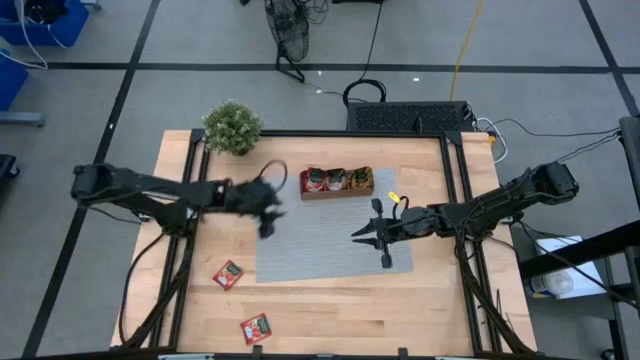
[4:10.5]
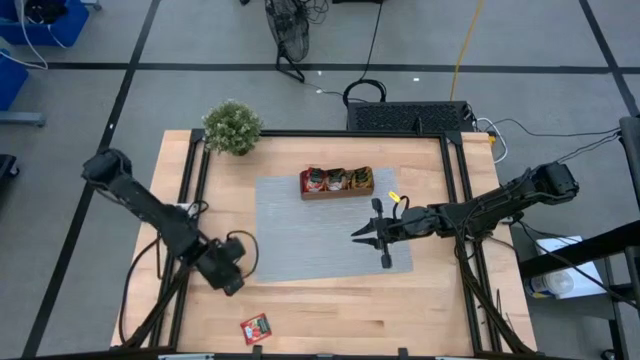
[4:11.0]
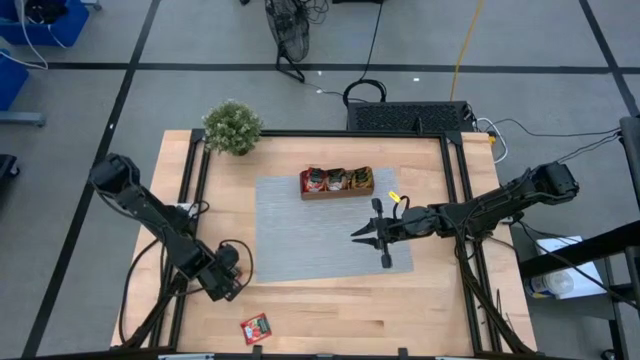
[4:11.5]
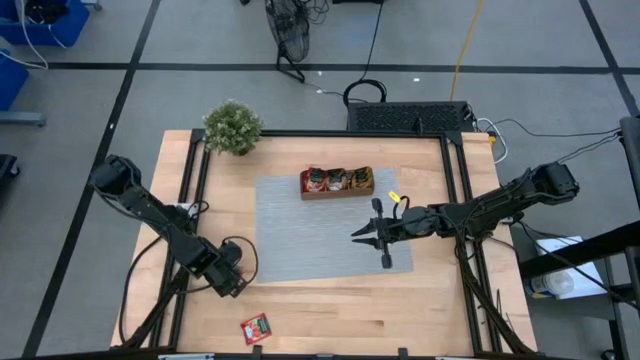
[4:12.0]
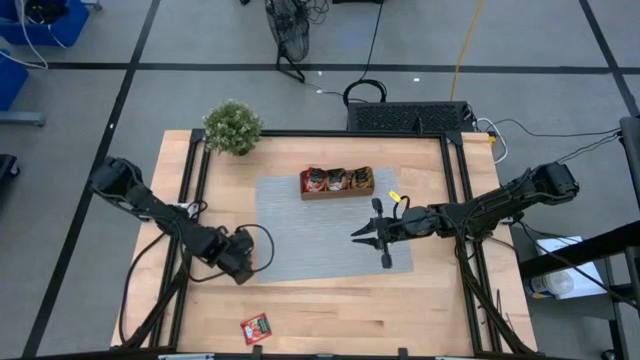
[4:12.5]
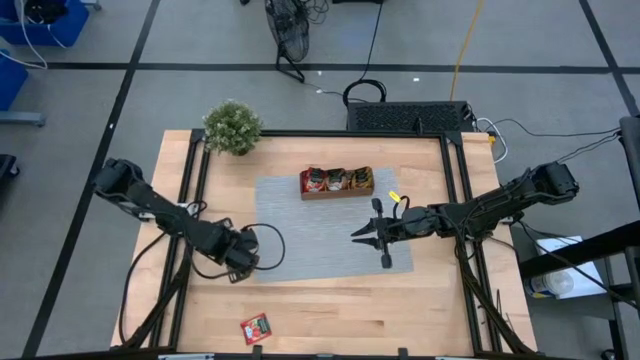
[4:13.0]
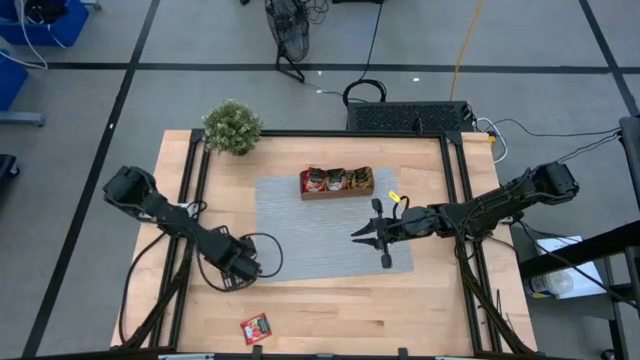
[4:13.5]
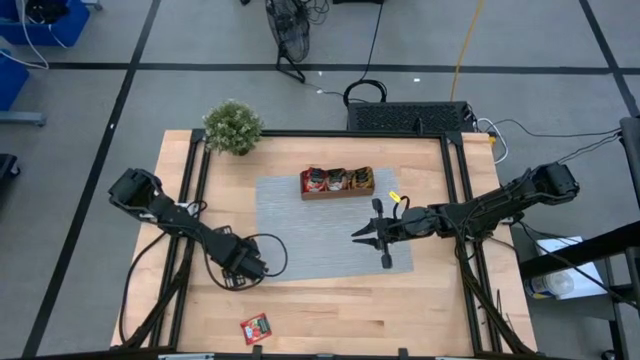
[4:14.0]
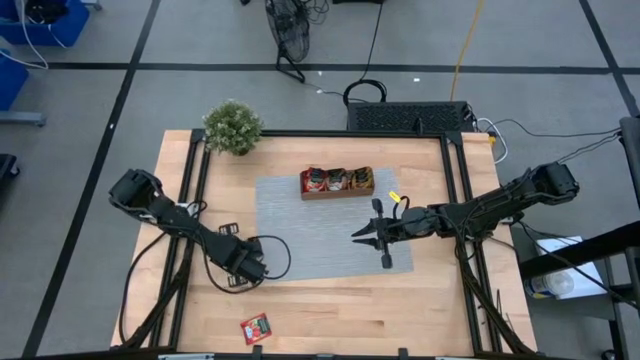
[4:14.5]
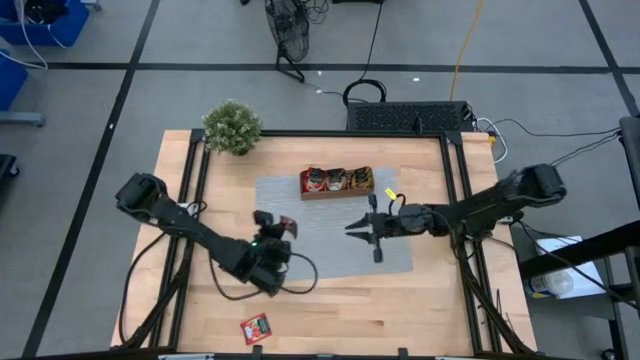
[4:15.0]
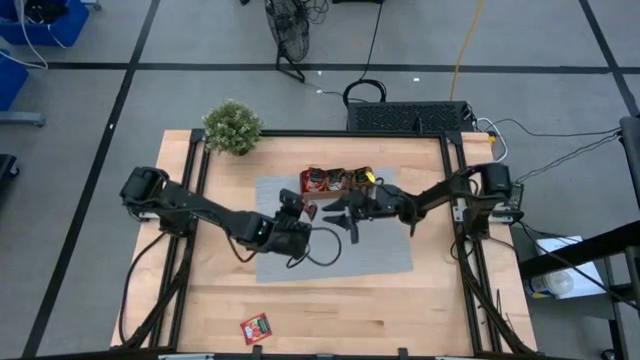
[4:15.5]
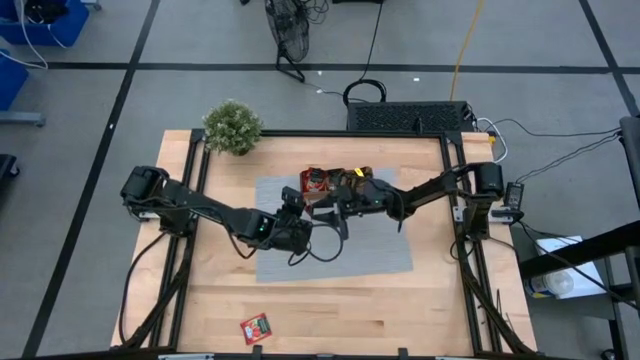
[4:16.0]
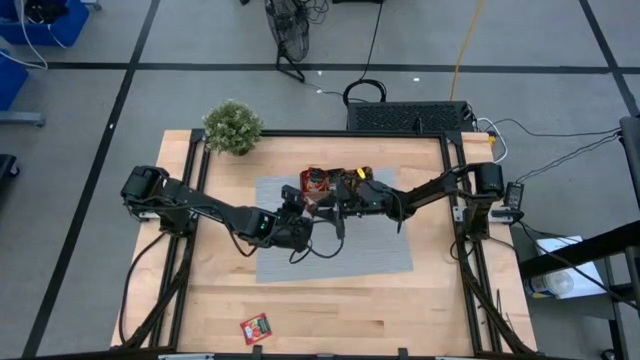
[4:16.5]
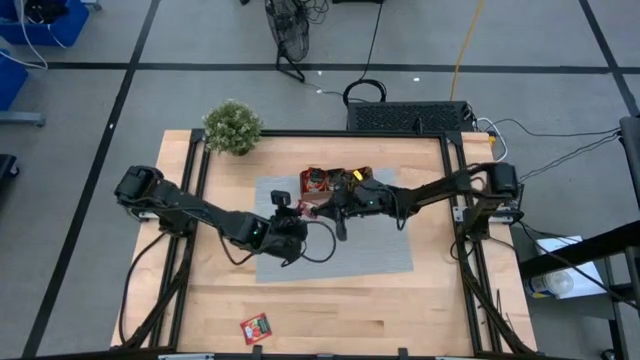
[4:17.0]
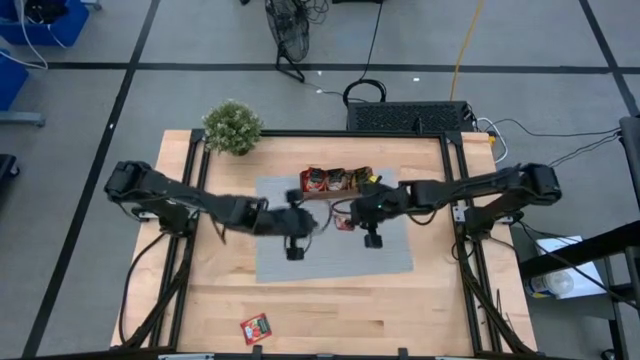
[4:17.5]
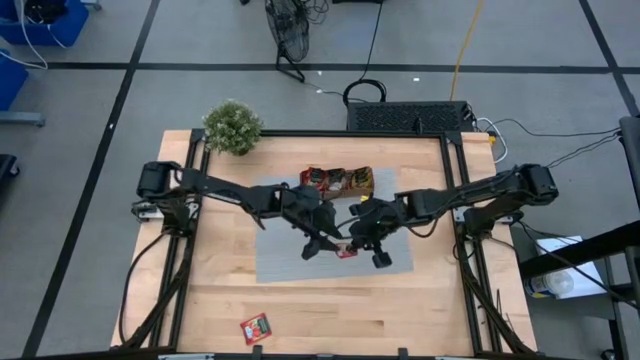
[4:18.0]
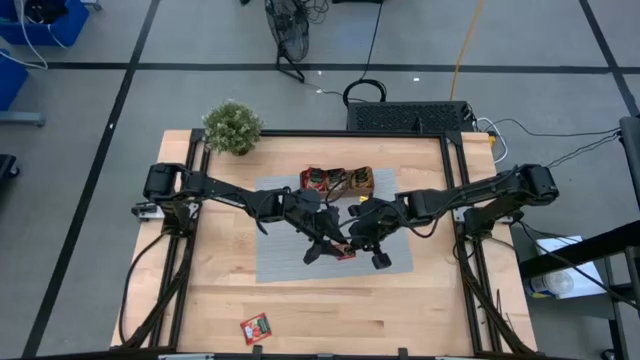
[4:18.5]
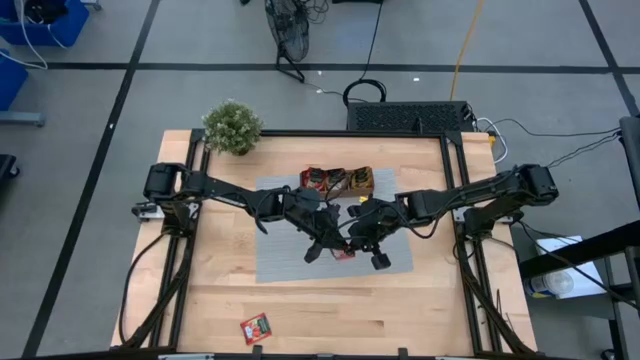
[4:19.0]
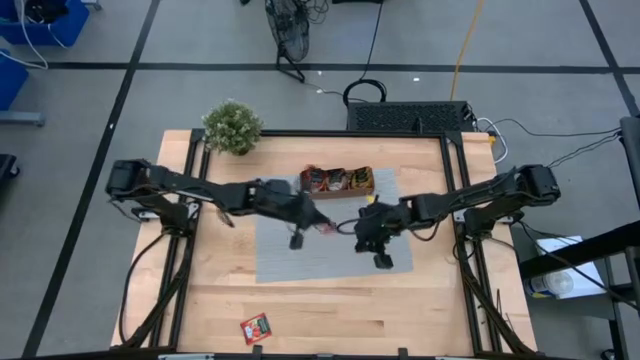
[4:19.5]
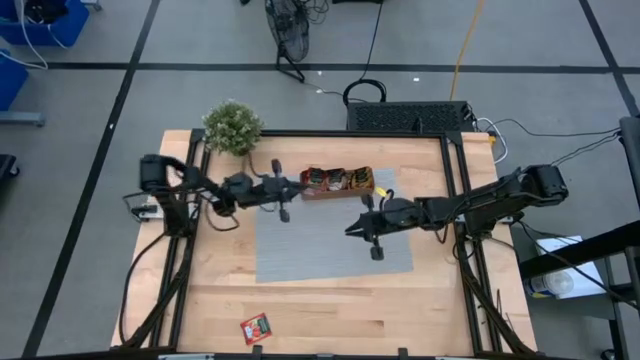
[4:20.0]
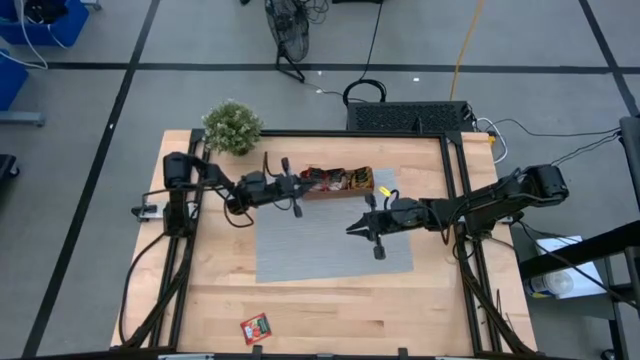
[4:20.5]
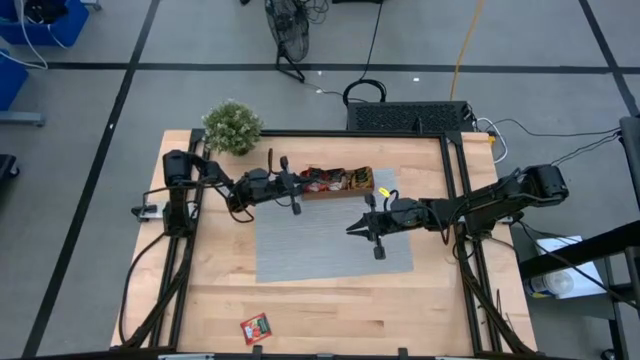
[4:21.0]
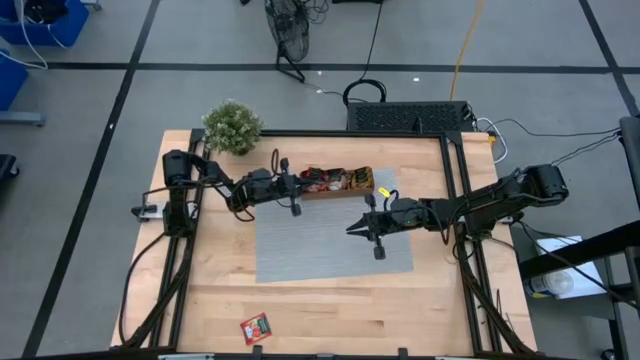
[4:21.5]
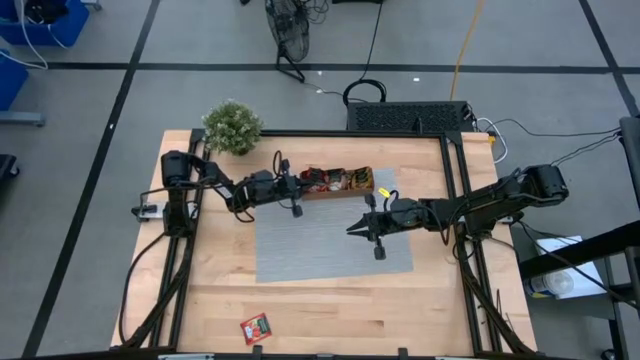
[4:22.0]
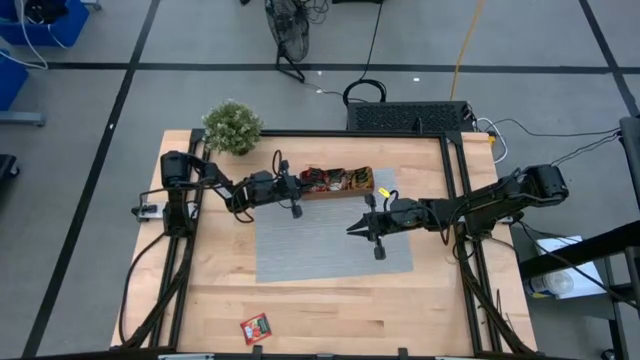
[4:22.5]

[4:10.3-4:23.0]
Task: Pick & Place Tea
Put the red tea bag into the left section of the wooden organizer

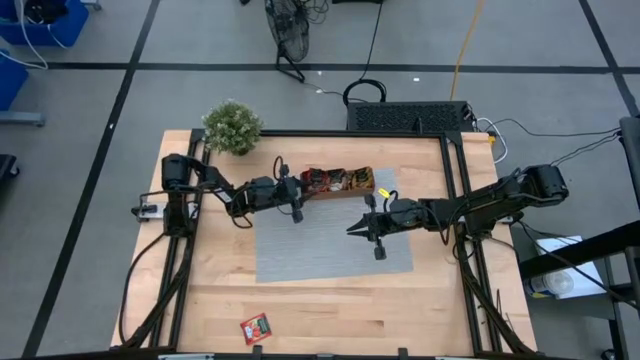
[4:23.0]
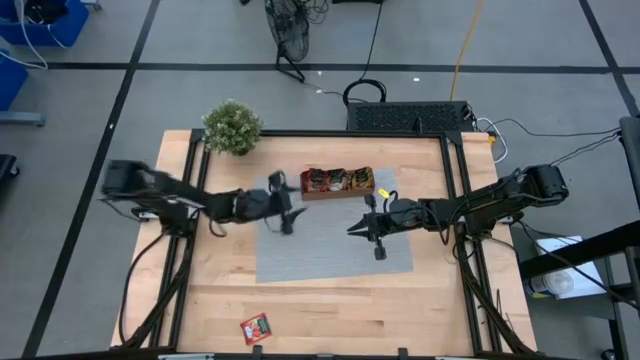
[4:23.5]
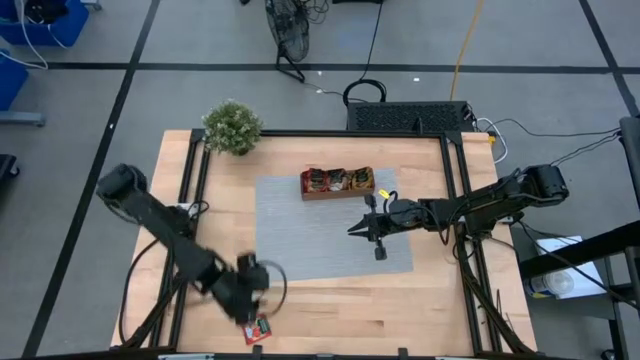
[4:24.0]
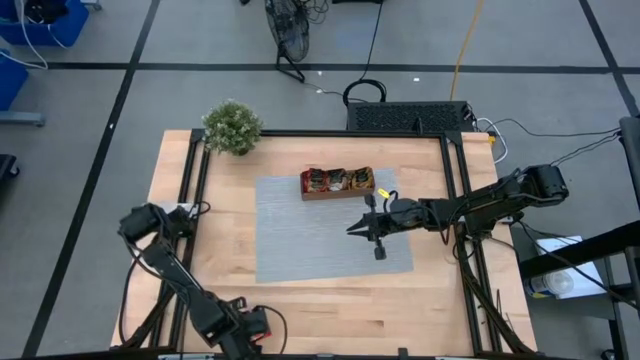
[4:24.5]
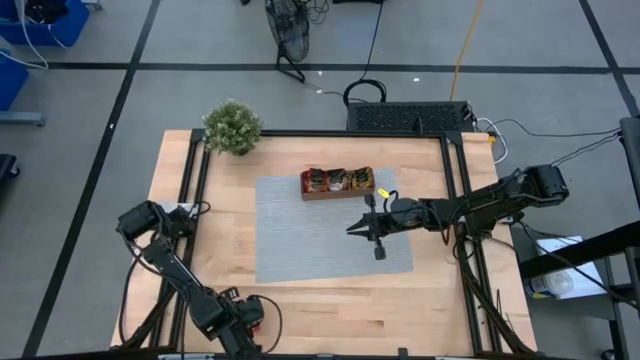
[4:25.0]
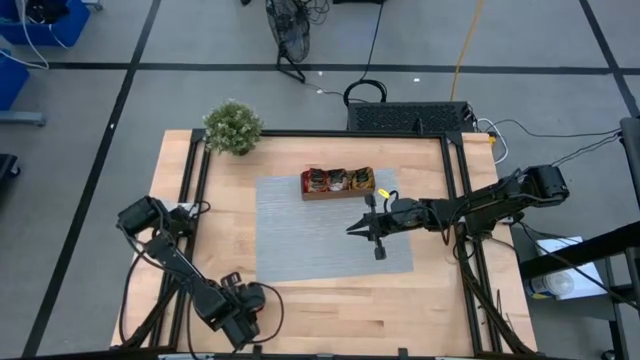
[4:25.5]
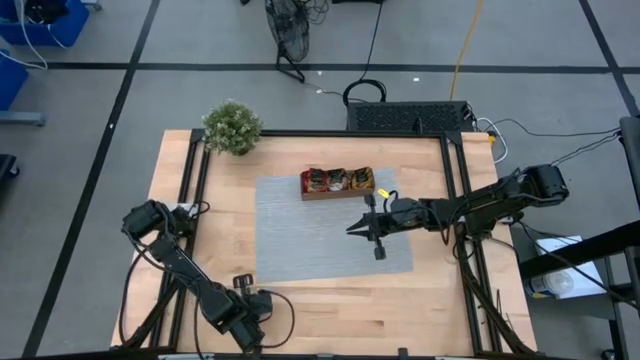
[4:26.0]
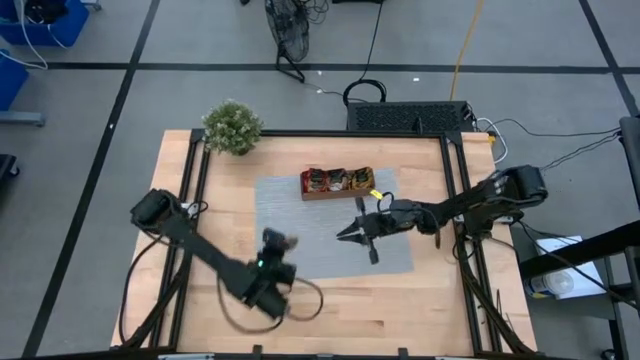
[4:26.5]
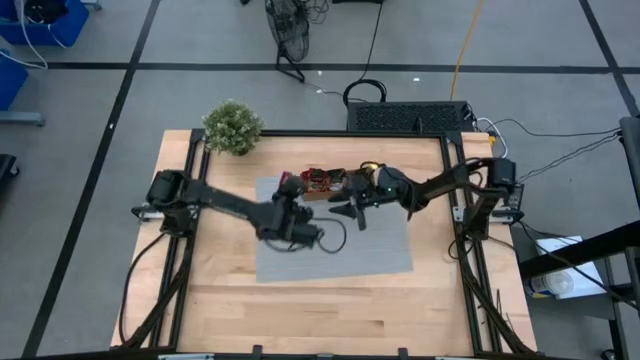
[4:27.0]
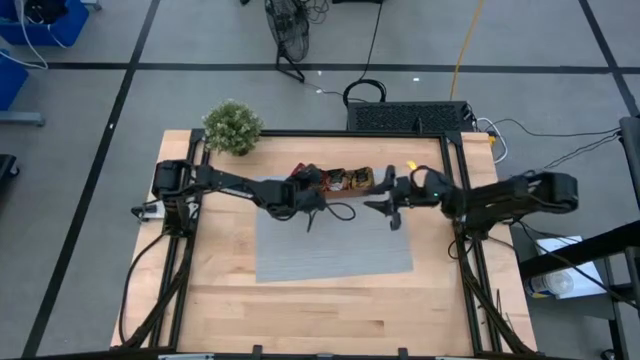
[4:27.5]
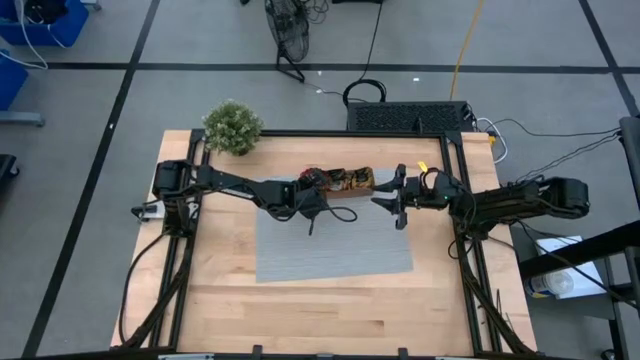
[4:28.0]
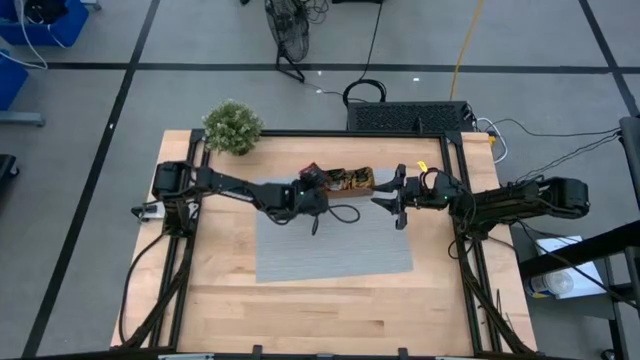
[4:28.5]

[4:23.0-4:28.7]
Put the red tea bag into the left section of the wooden organizer

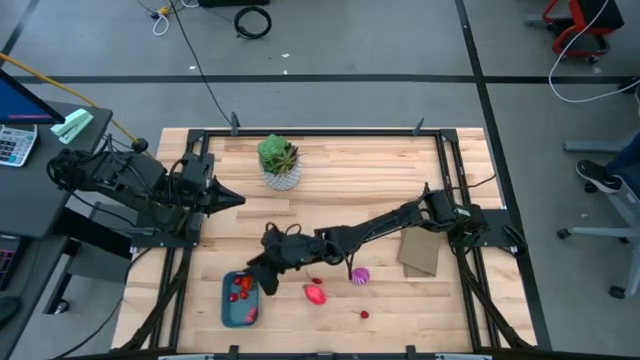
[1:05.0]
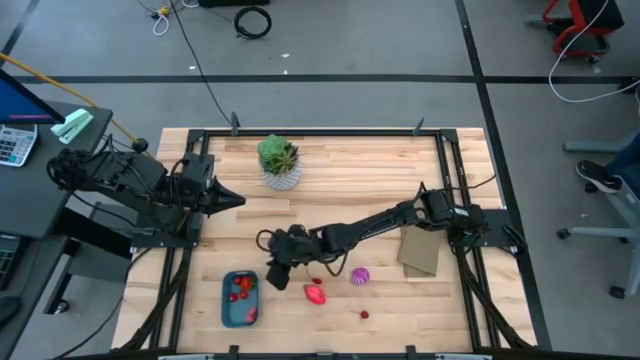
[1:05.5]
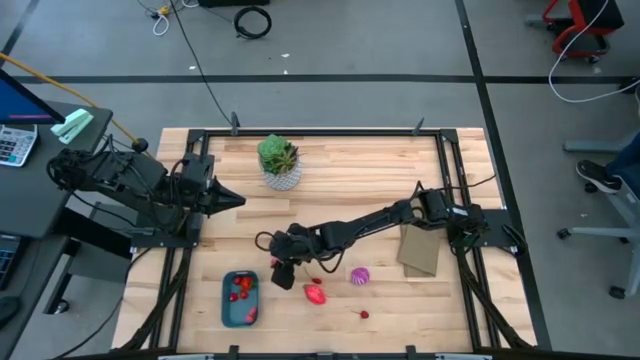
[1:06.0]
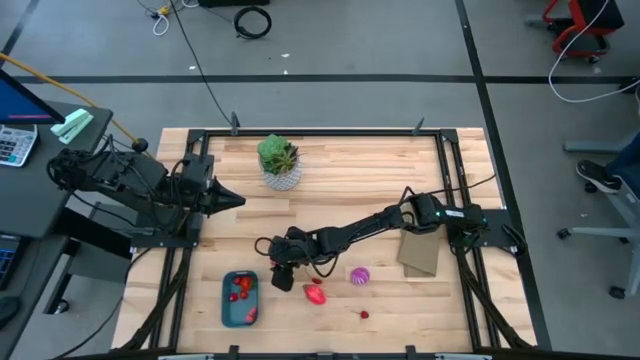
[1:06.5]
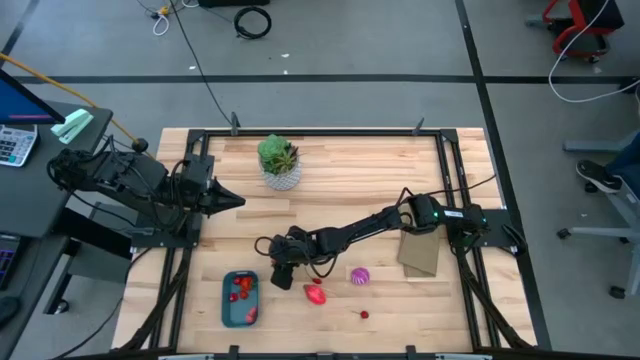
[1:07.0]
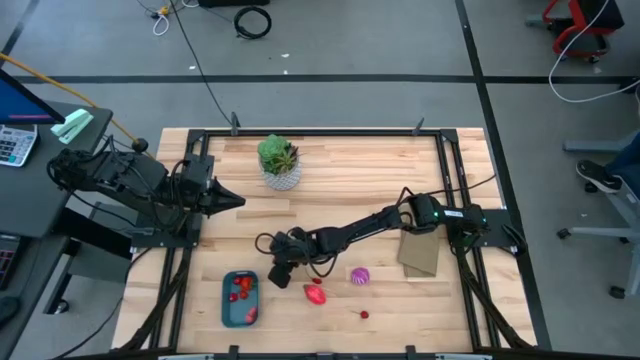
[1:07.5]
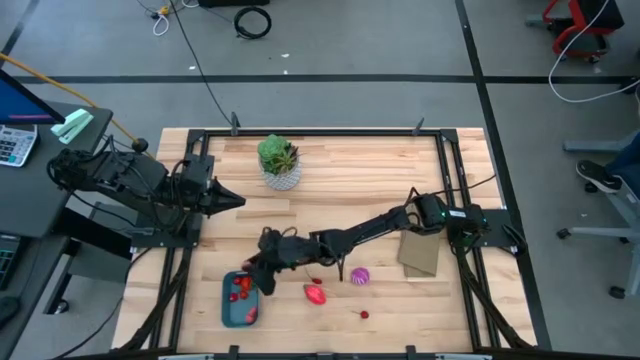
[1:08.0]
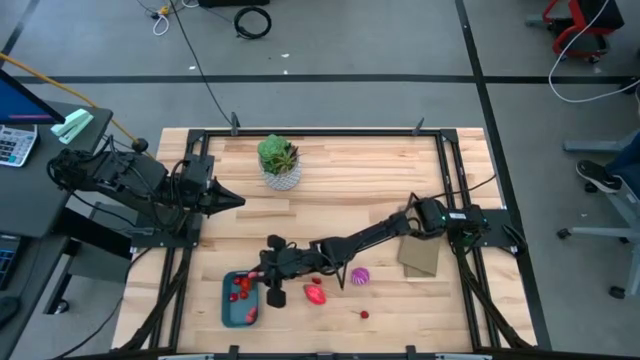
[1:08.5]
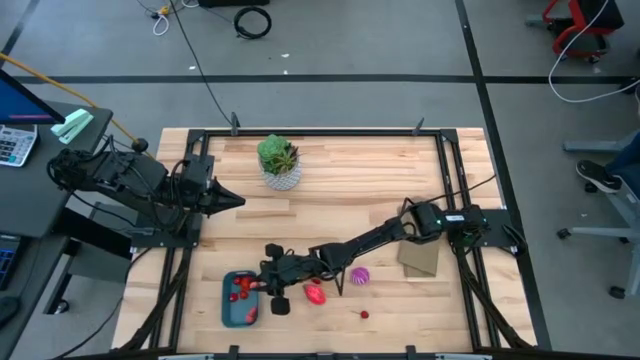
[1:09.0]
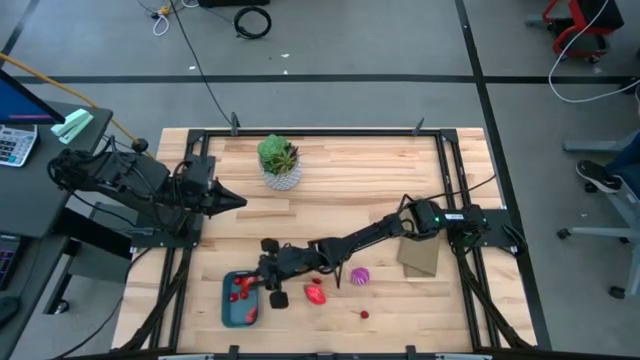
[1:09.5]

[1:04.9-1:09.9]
Task: Pick and placing Produce into tupperware
Put the peach into the bin
